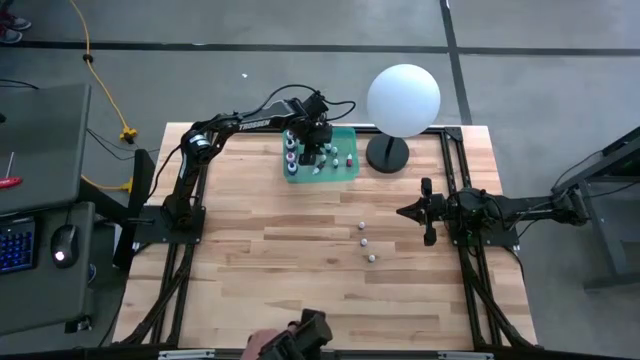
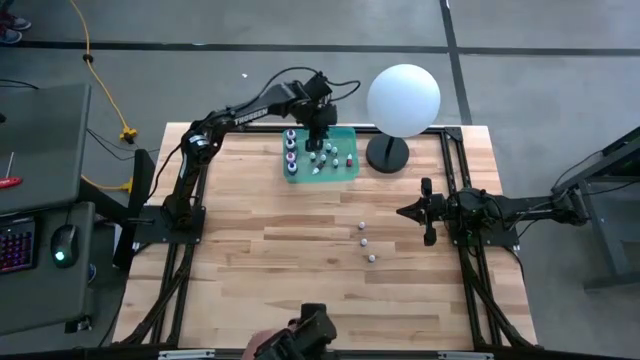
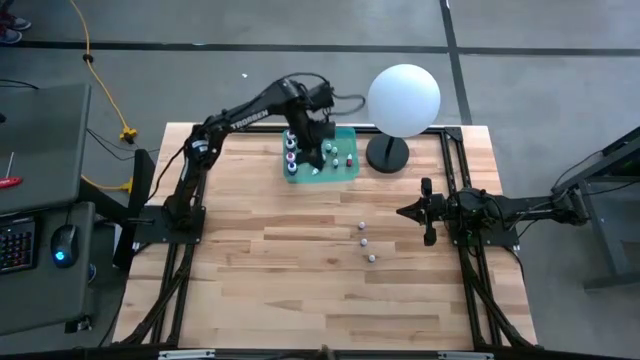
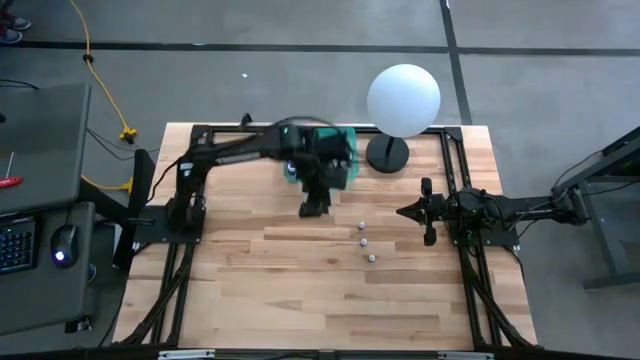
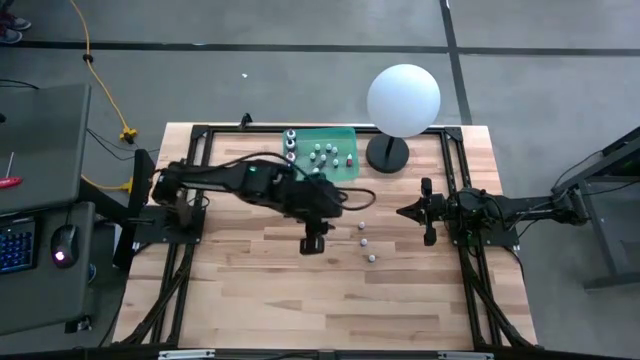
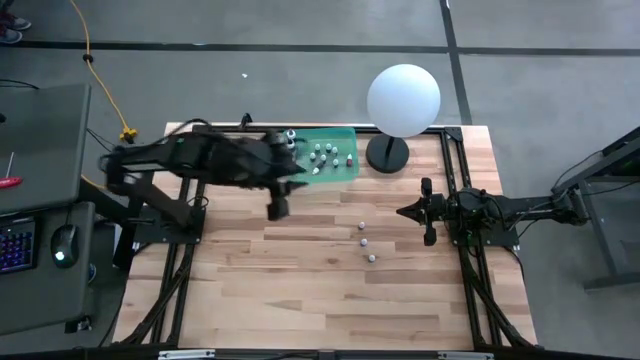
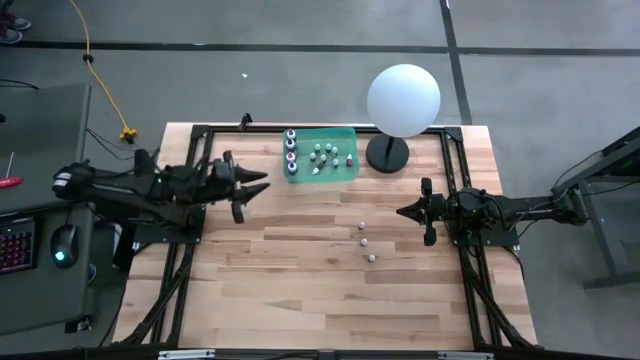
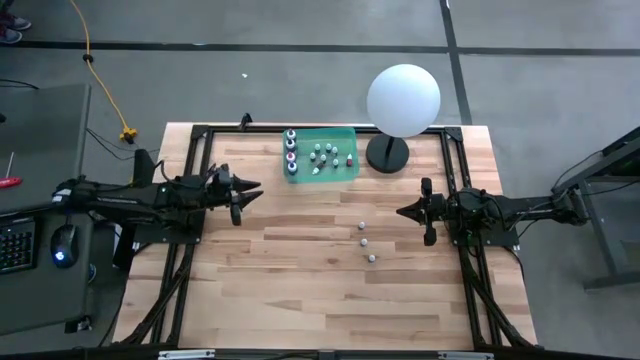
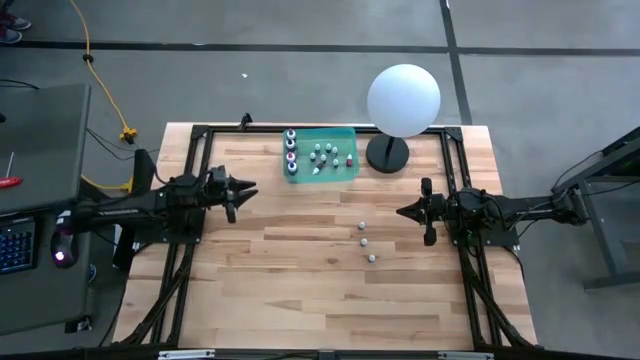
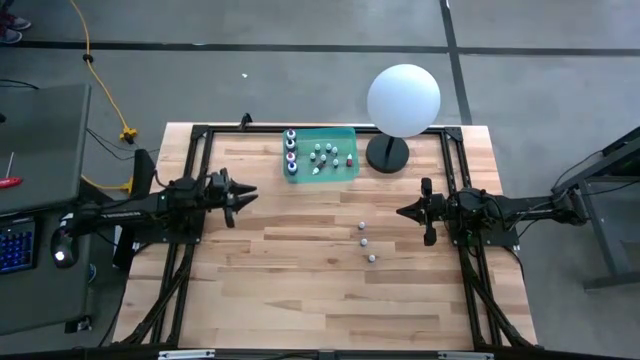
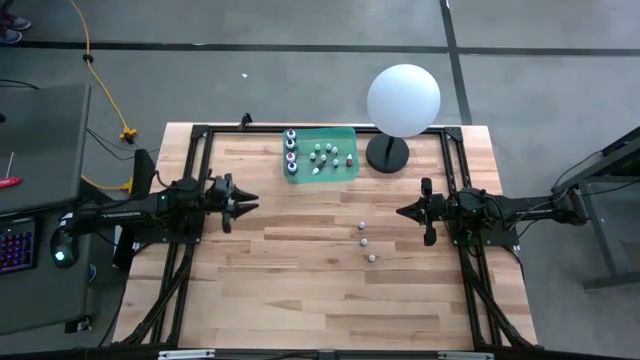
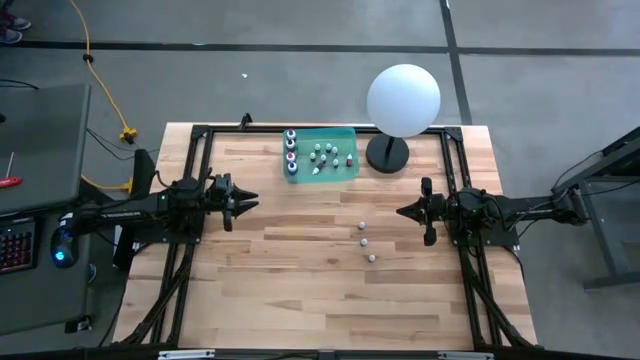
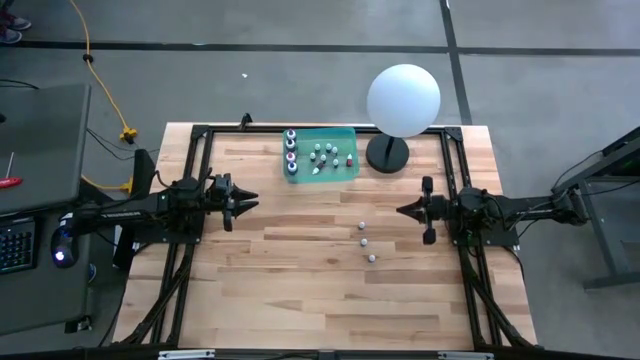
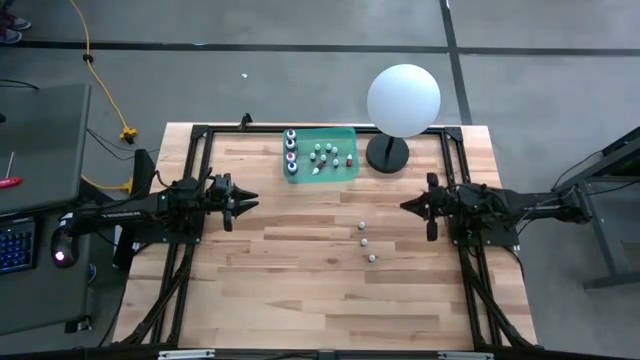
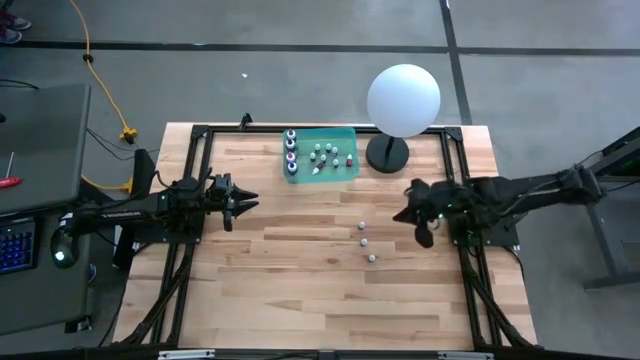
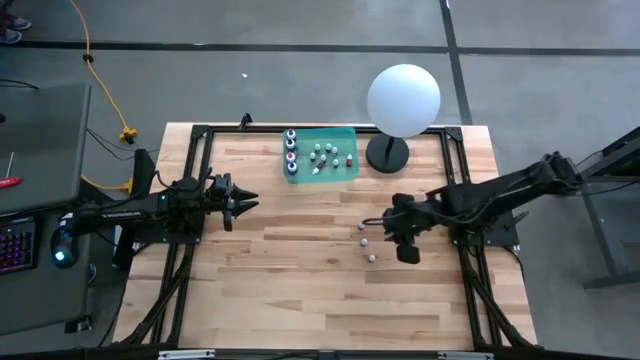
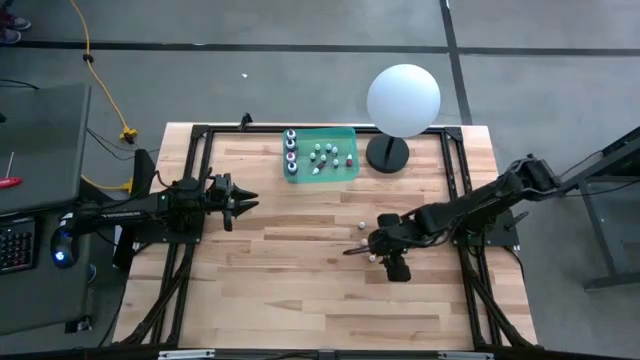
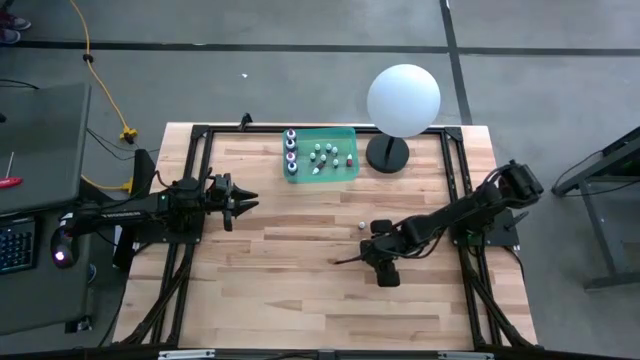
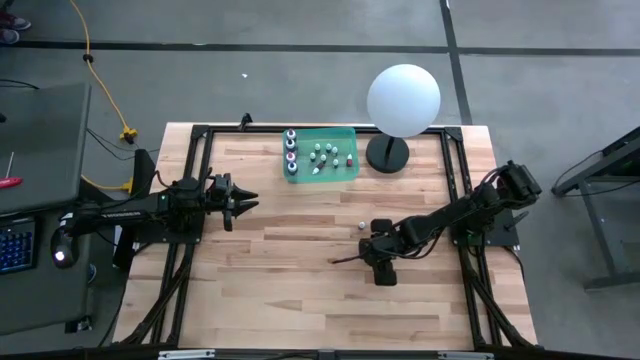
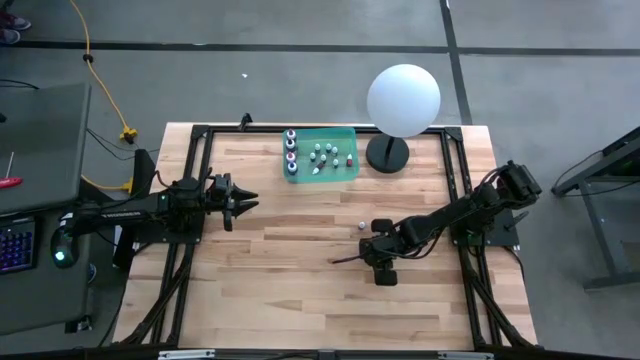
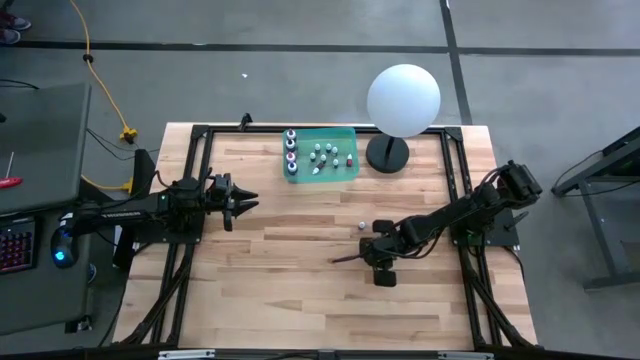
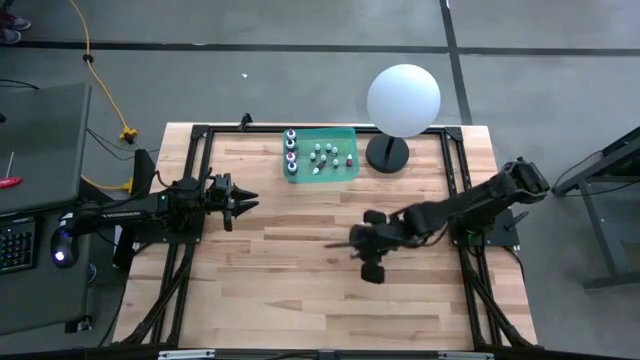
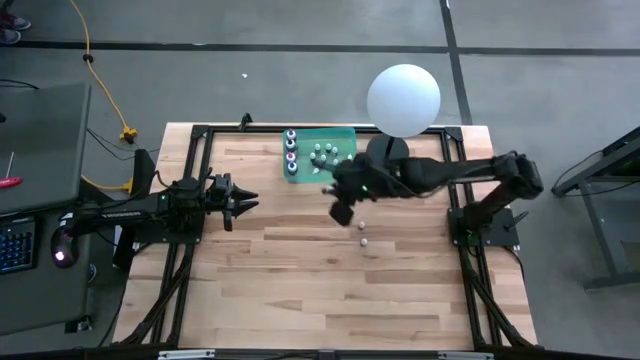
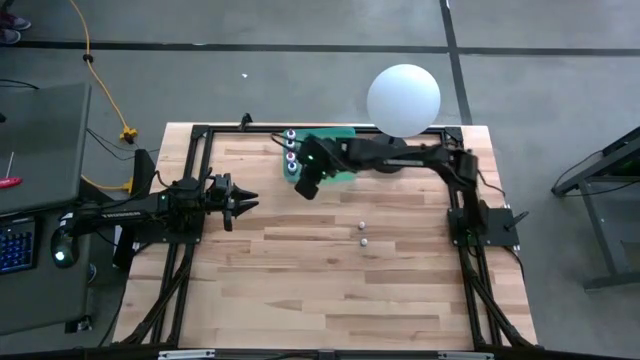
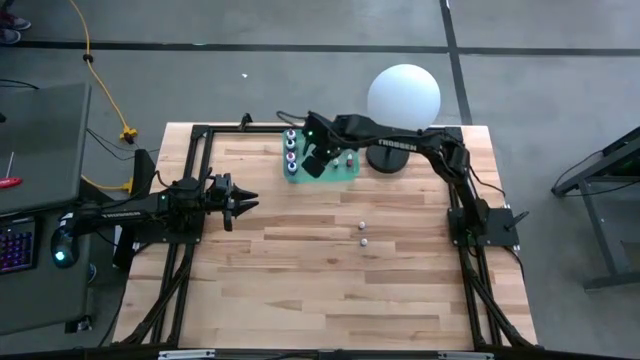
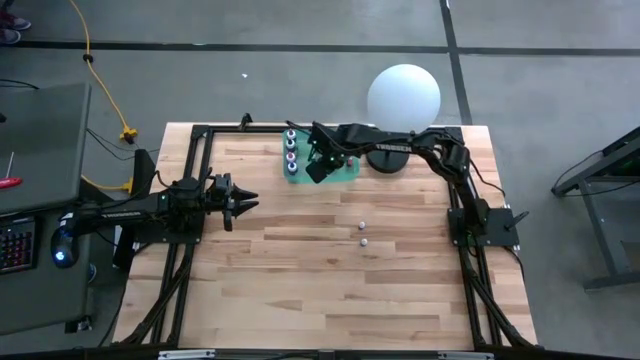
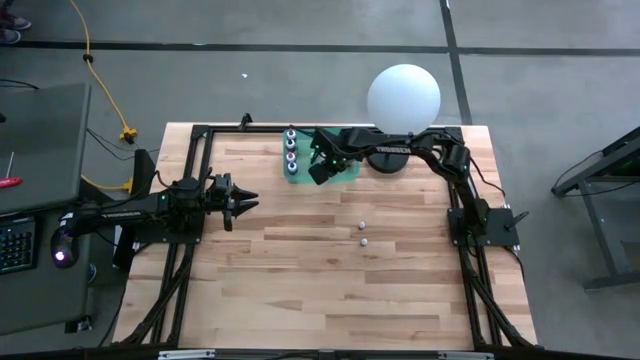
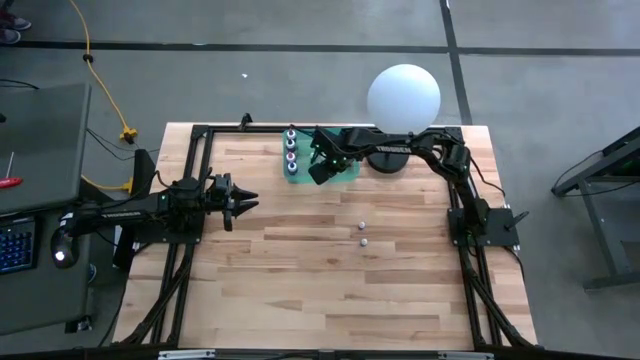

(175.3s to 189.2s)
Task: Pick & Place food coloring
Put the small black food coloring bottle into the green bin

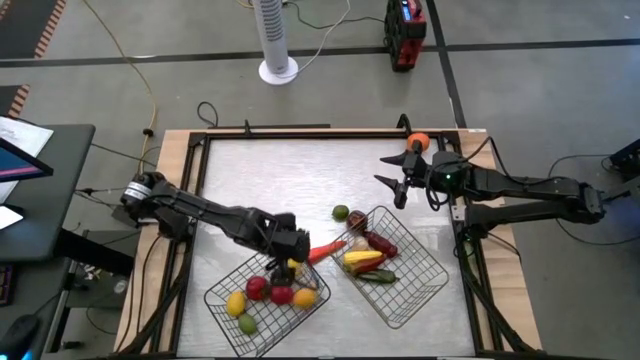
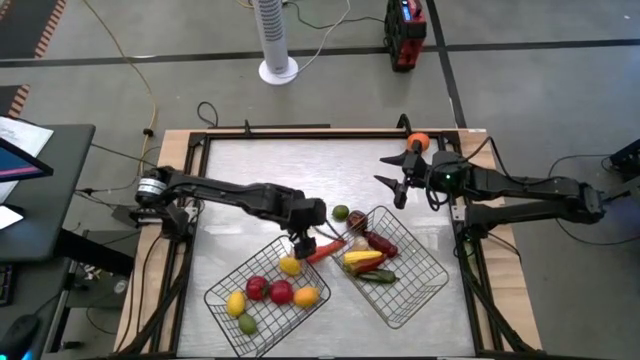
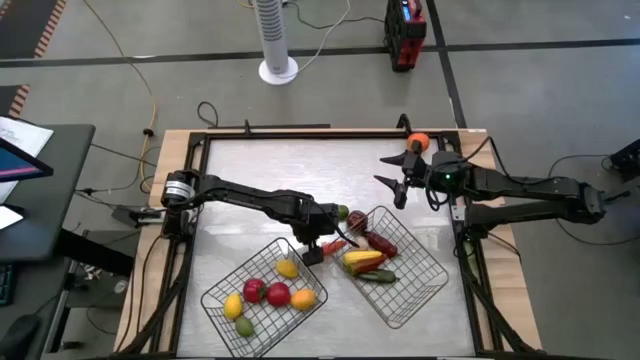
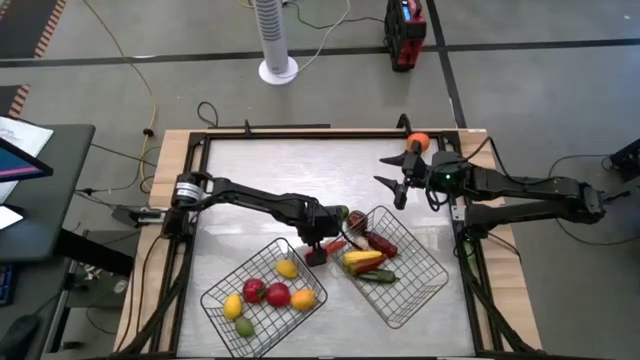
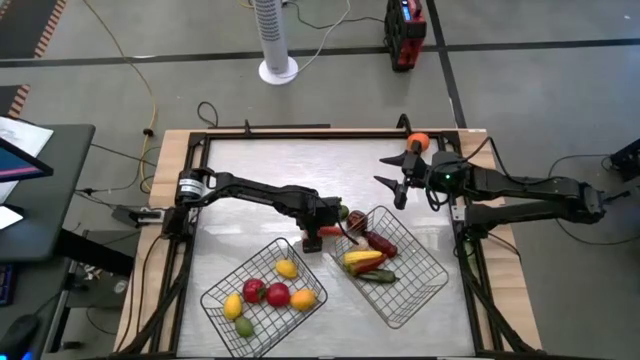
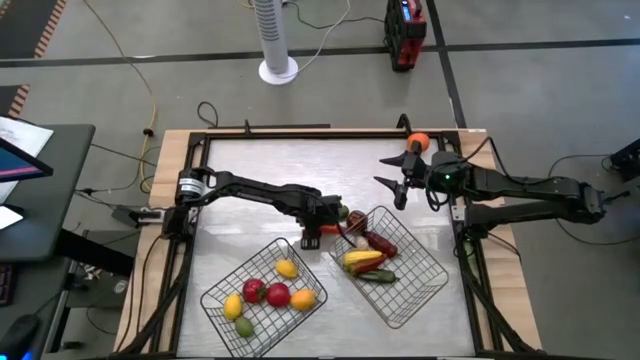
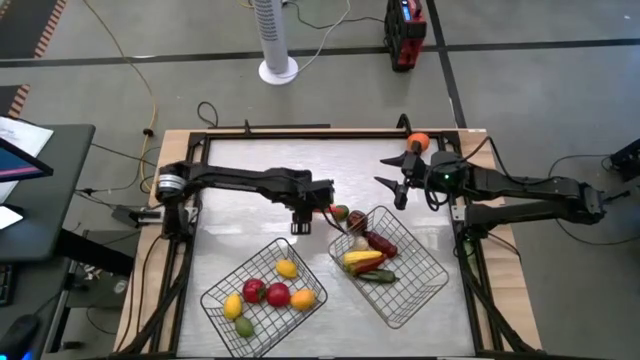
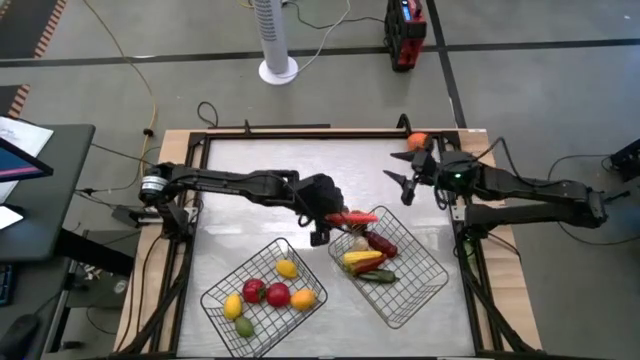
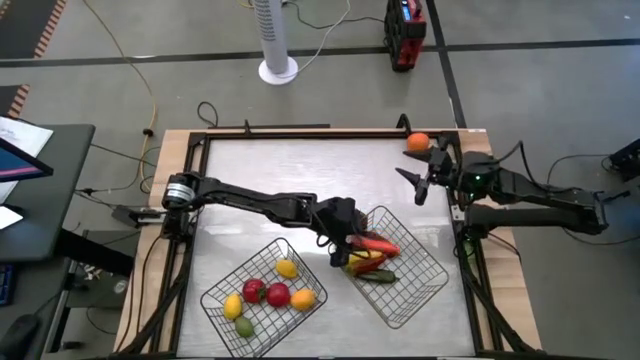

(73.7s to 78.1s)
Task: Sort produce into baskets
Put the carrot into the gold basket

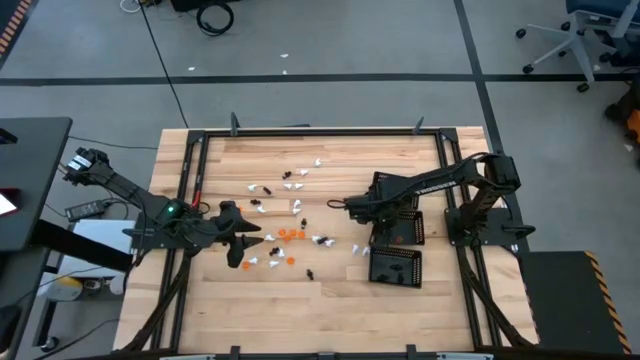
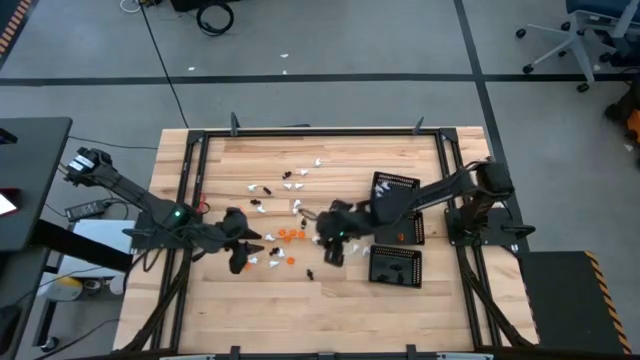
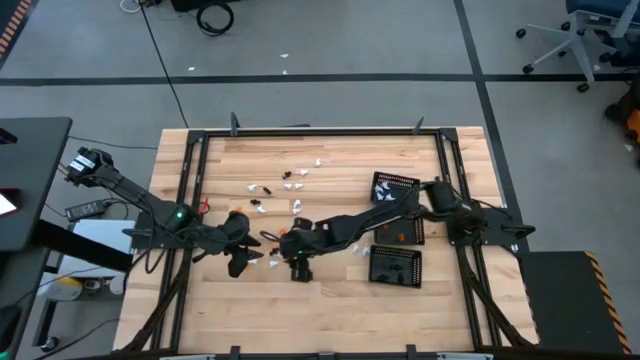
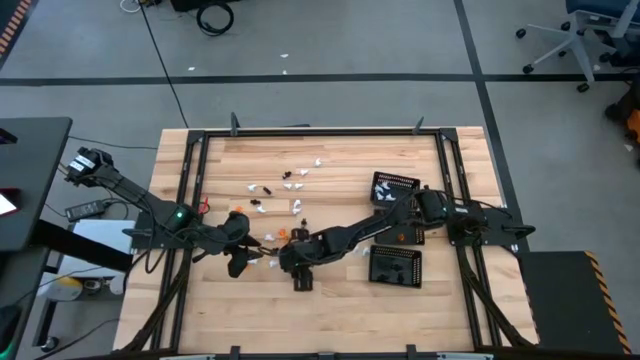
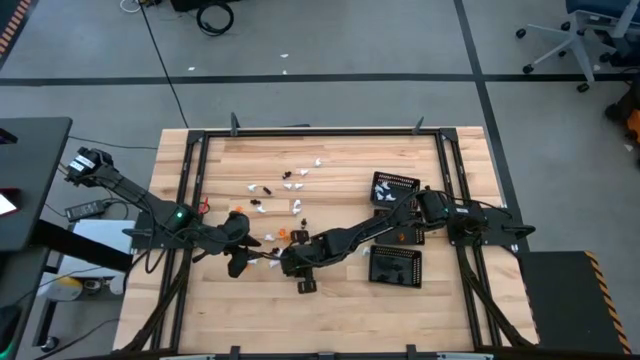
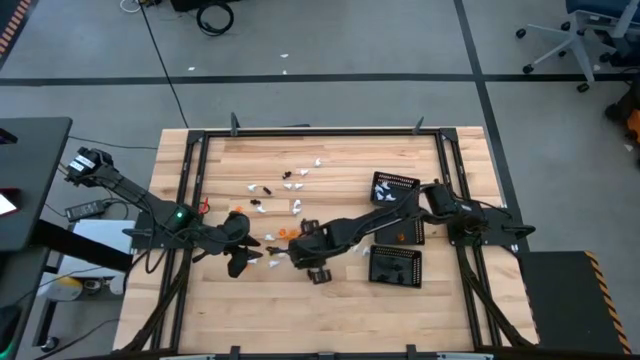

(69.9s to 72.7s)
Task: Sort Halloween decoration
Put the orange pumpkin toy into the center black bin

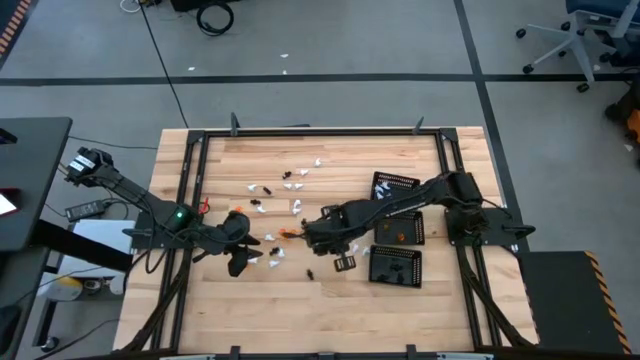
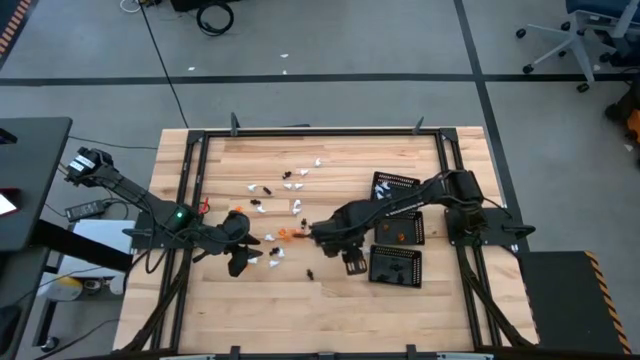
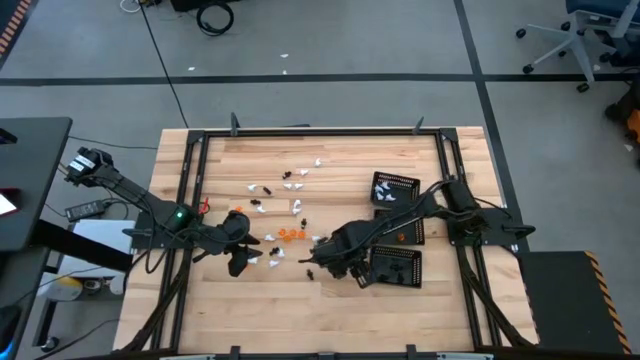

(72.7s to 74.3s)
Put the orange pumpkin toy into the center black bin
